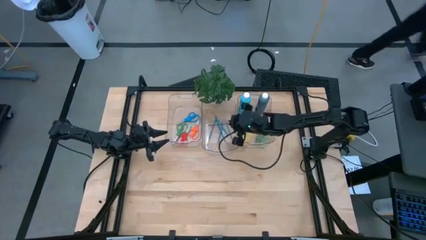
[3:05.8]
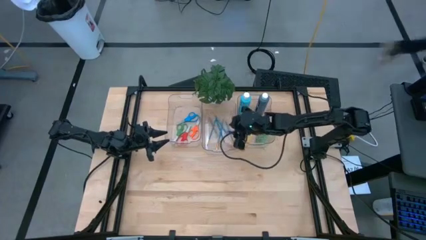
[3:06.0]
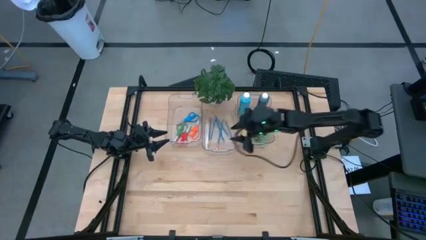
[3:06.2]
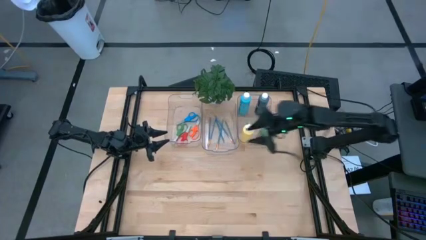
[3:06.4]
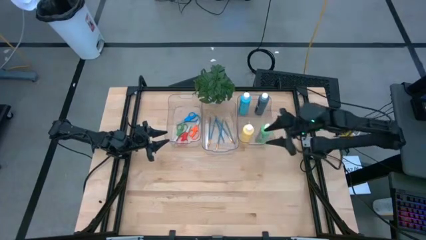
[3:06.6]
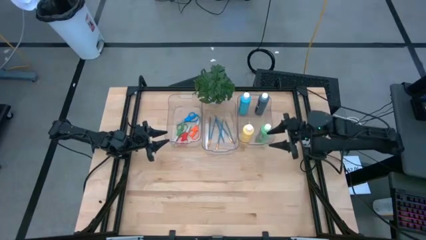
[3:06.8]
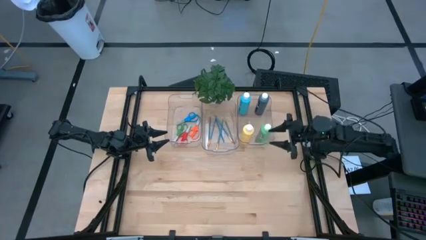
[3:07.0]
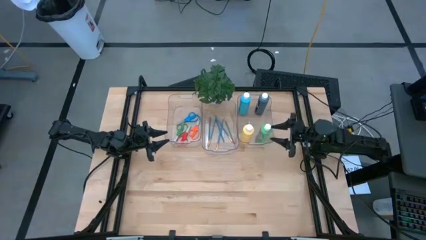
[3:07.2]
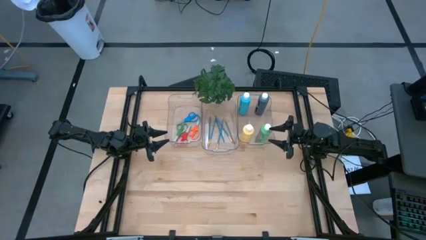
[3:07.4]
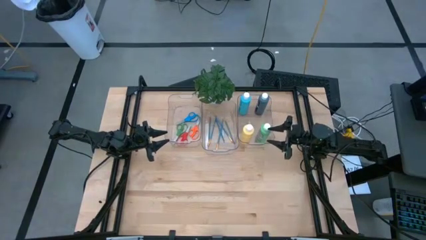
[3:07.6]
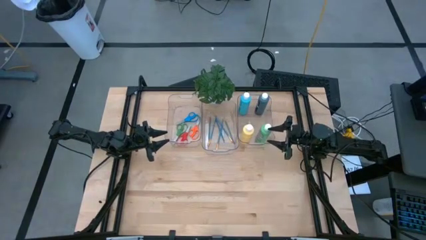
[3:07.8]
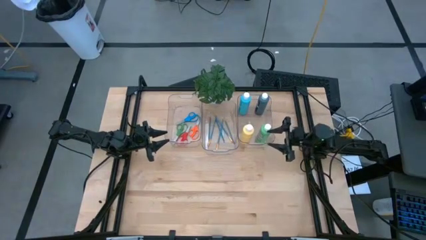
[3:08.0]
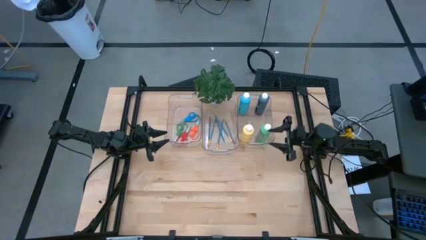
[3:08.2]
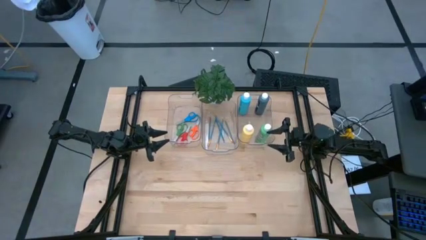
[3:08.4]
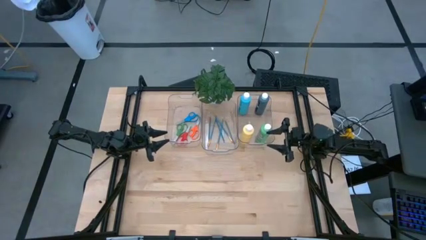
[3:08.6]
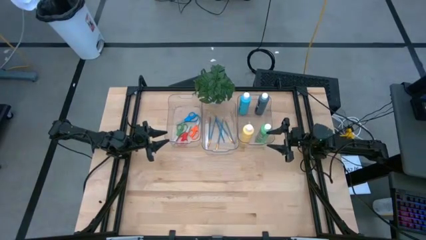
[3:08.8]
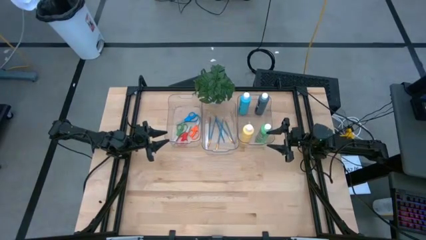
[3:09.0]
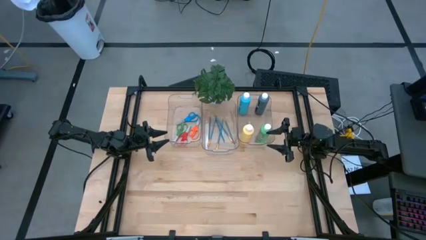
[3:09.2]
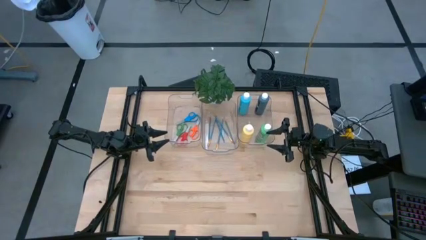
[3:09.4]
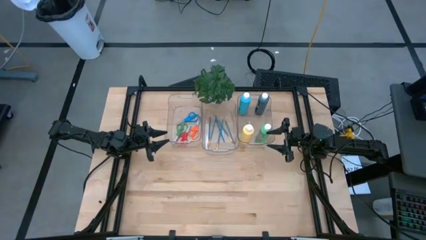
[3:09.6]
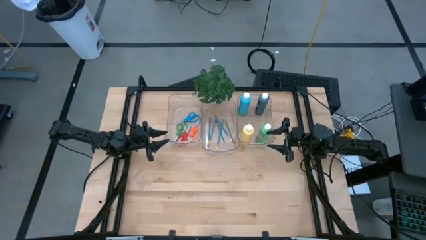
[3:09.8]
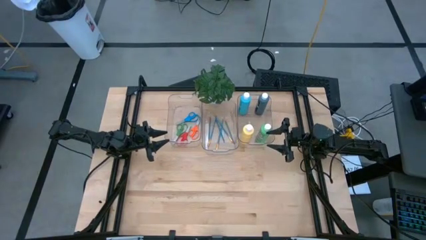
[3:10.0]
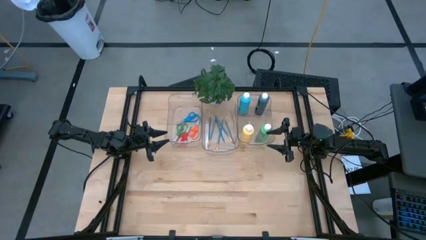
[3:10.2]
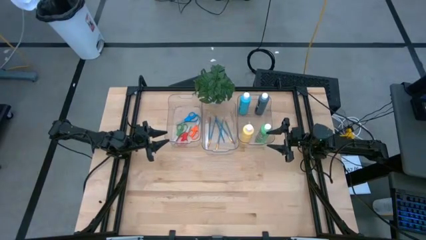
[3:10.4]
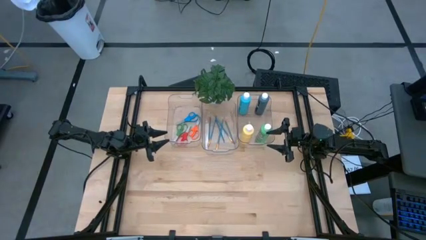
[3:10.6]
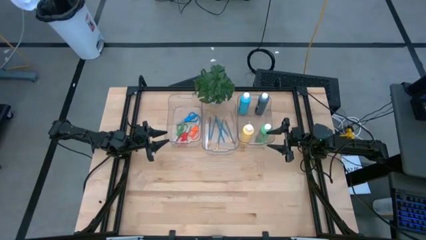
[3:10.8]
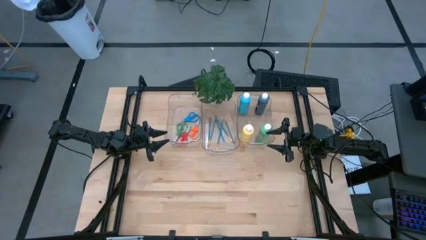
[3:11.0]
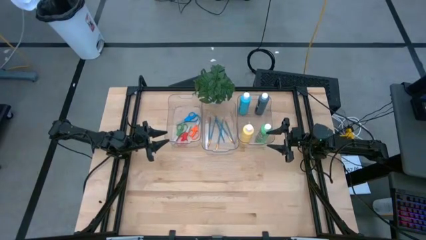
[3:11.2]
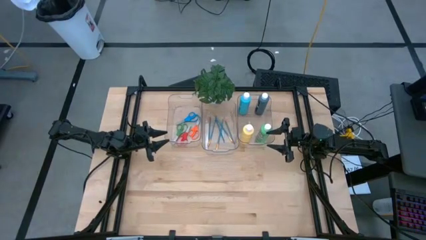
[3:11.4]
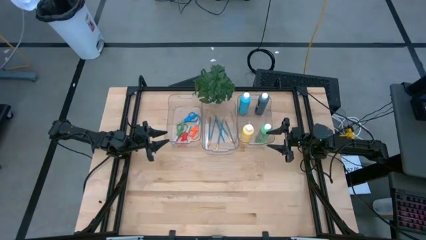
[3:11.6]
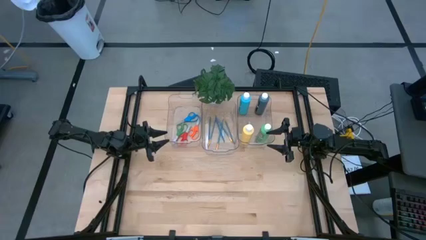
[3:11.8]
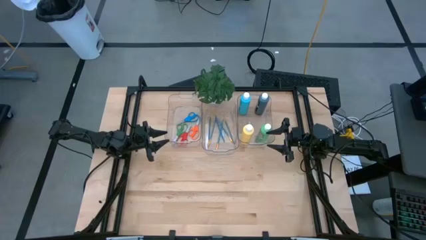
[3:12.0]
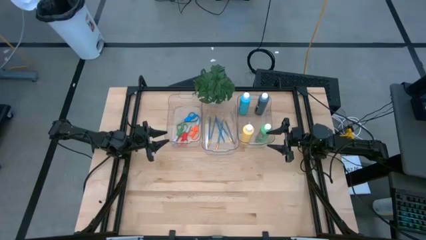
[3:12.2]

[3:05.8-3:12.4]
Task: Pick & Place Paint Supplies
Return to Home Position

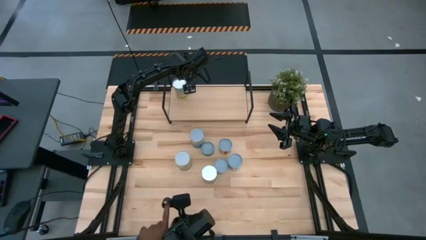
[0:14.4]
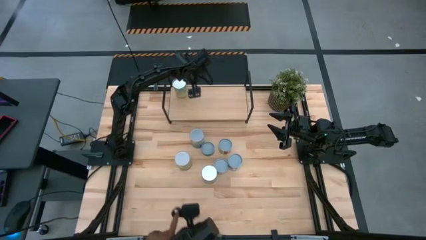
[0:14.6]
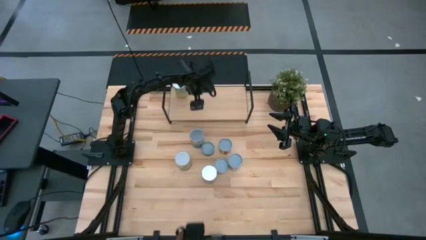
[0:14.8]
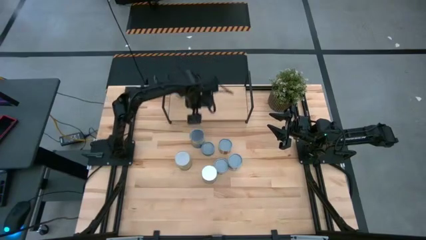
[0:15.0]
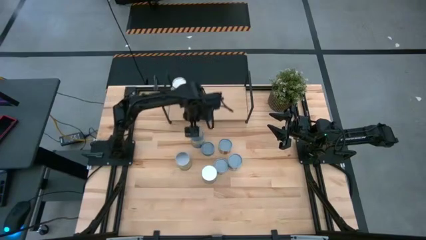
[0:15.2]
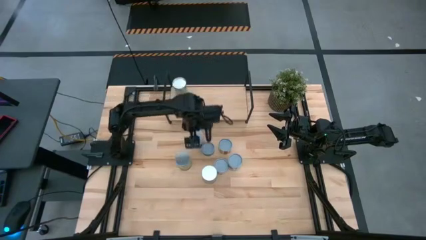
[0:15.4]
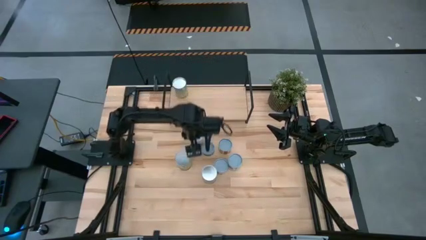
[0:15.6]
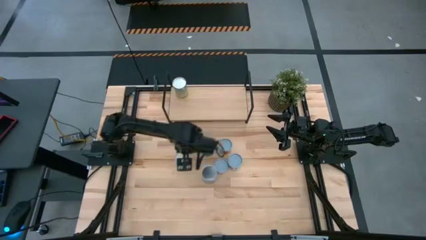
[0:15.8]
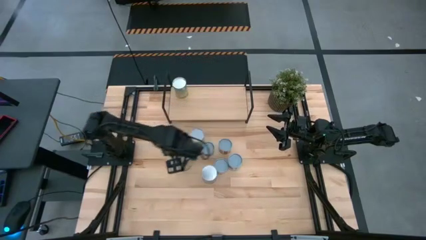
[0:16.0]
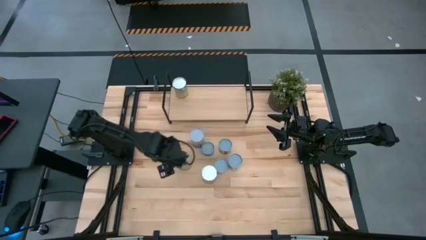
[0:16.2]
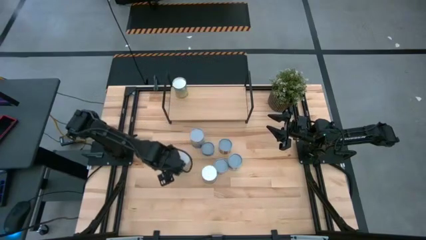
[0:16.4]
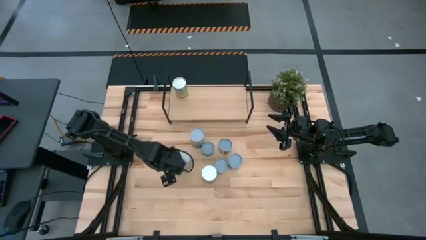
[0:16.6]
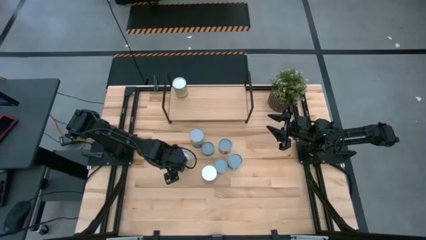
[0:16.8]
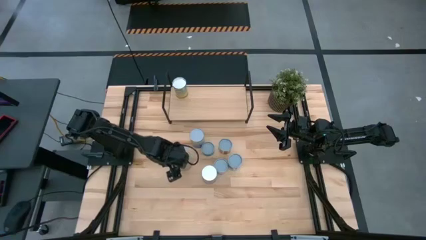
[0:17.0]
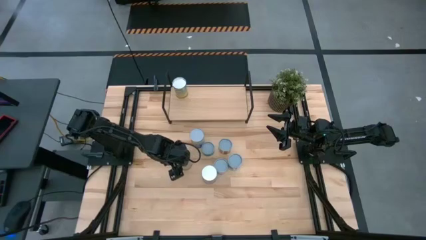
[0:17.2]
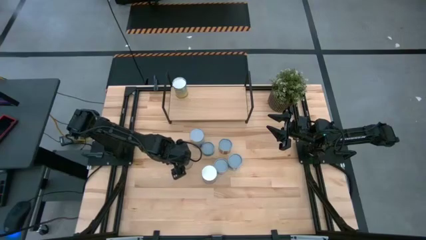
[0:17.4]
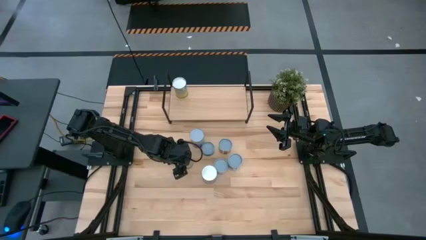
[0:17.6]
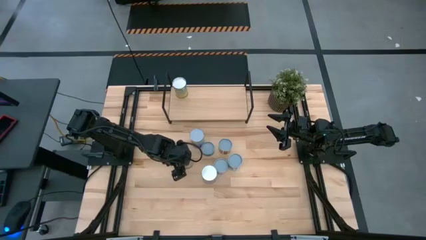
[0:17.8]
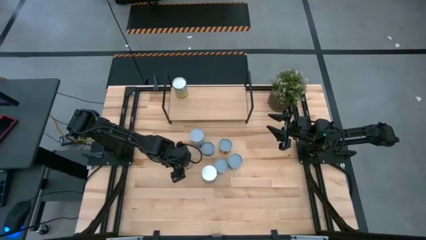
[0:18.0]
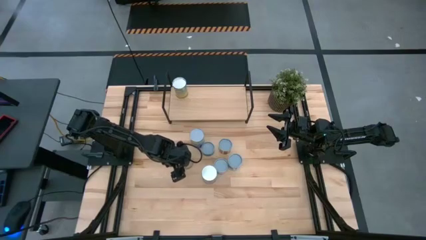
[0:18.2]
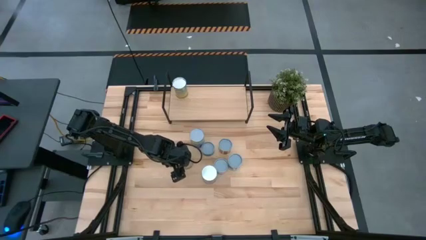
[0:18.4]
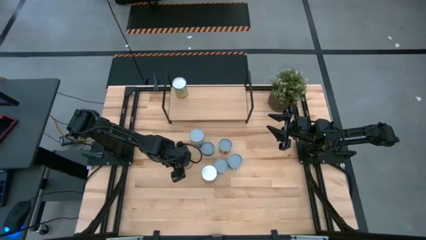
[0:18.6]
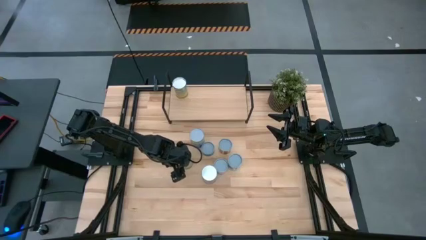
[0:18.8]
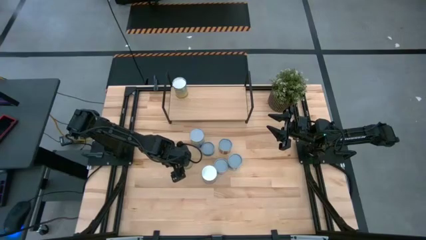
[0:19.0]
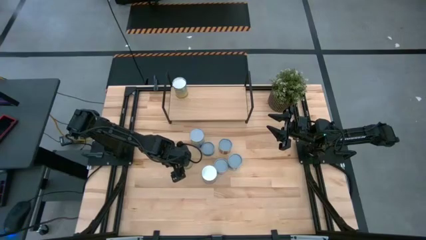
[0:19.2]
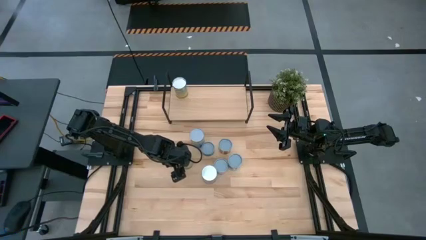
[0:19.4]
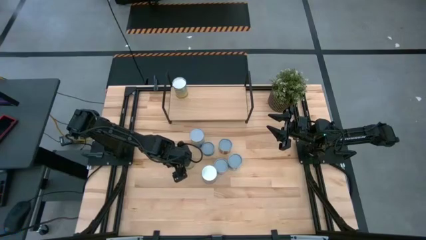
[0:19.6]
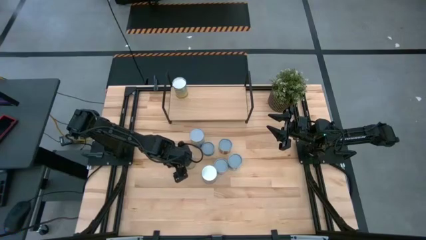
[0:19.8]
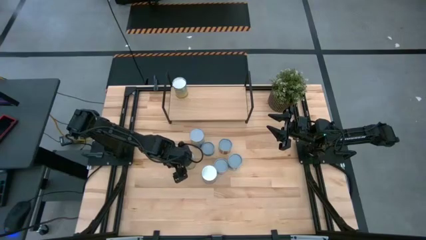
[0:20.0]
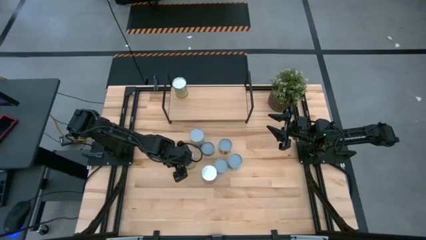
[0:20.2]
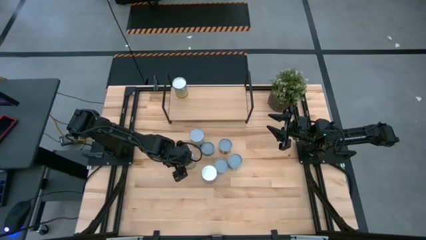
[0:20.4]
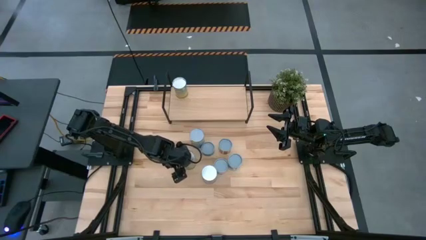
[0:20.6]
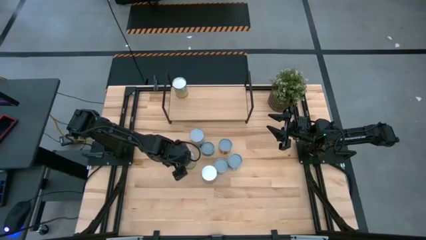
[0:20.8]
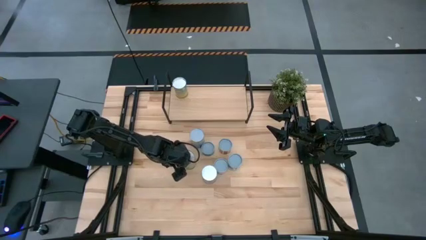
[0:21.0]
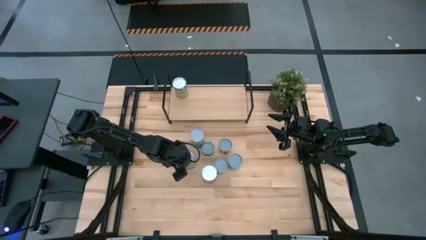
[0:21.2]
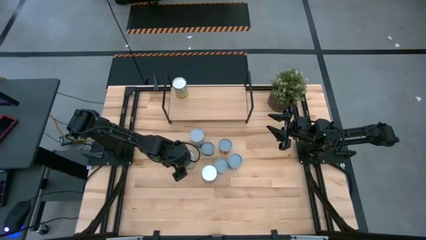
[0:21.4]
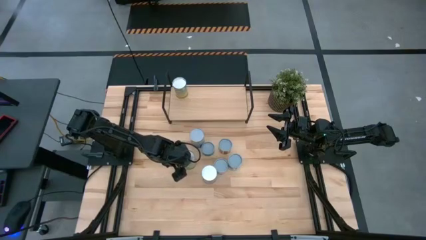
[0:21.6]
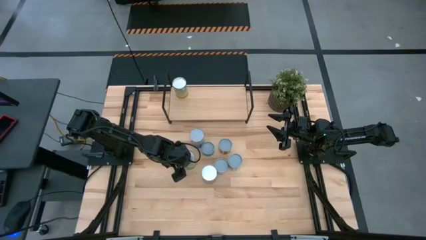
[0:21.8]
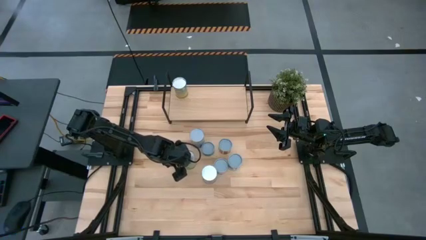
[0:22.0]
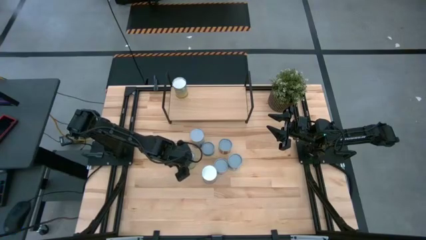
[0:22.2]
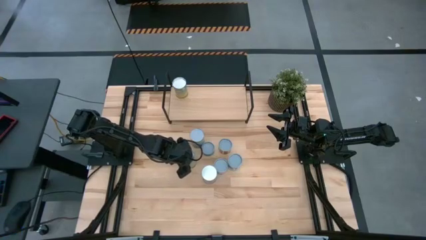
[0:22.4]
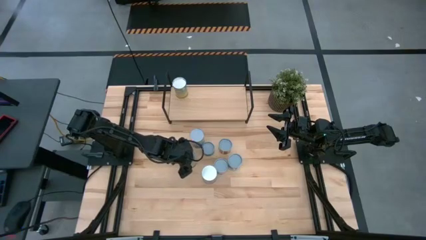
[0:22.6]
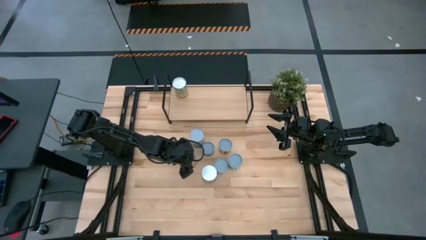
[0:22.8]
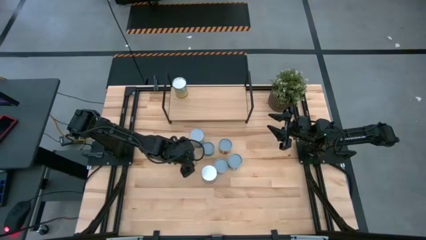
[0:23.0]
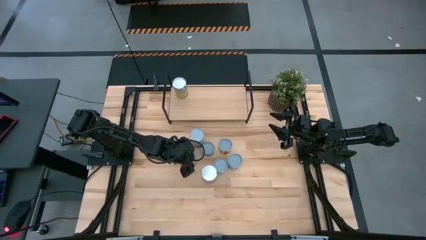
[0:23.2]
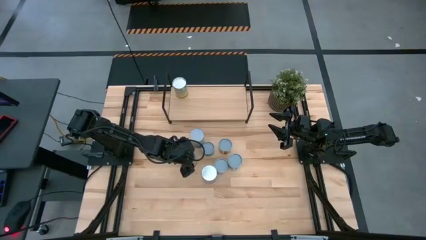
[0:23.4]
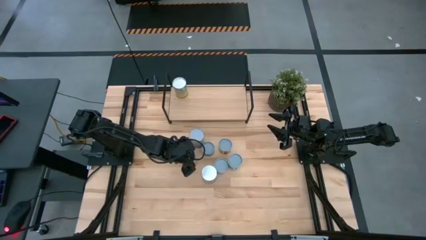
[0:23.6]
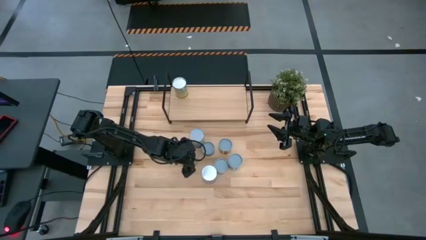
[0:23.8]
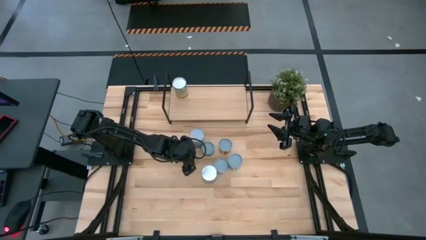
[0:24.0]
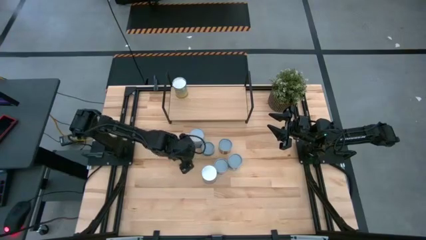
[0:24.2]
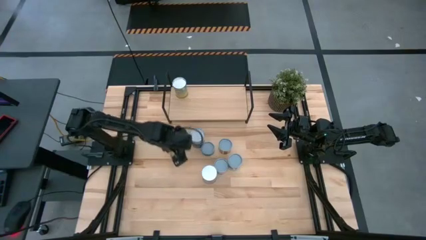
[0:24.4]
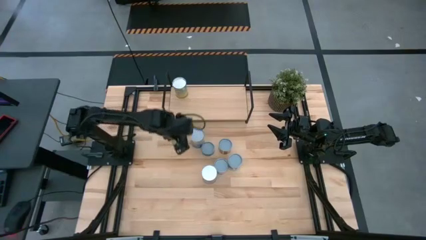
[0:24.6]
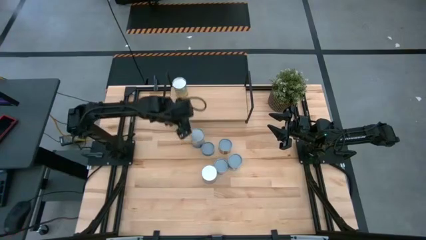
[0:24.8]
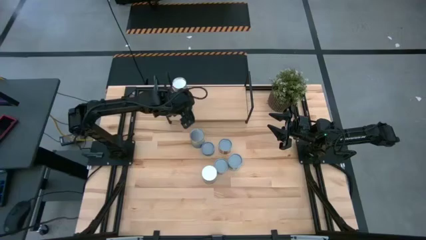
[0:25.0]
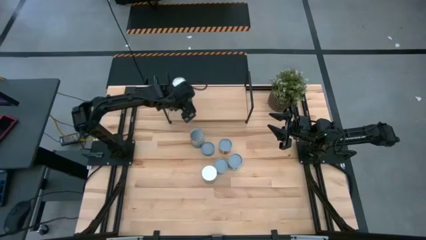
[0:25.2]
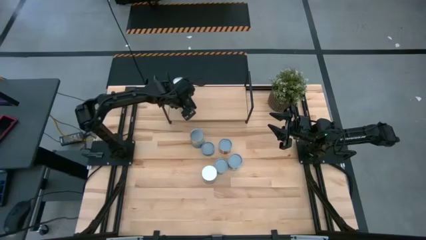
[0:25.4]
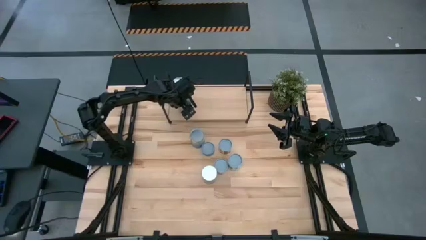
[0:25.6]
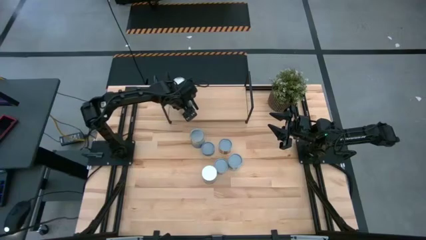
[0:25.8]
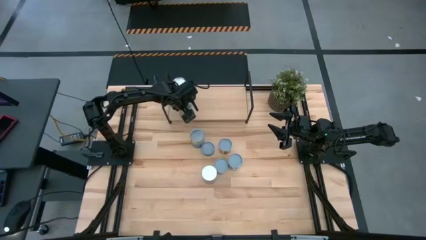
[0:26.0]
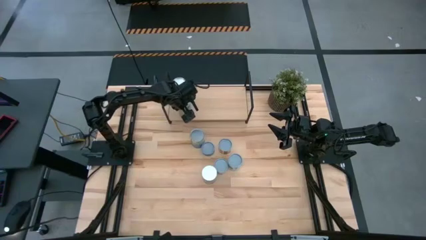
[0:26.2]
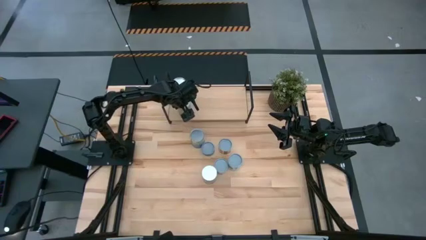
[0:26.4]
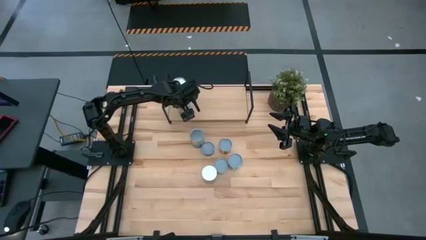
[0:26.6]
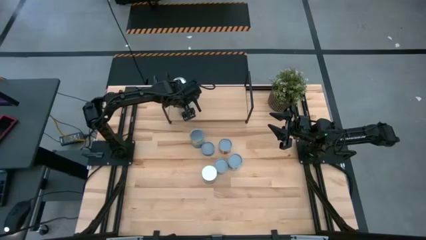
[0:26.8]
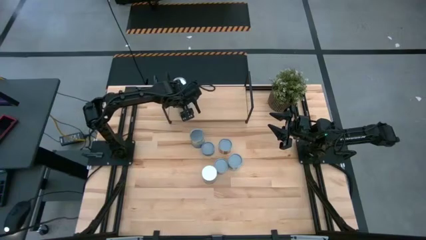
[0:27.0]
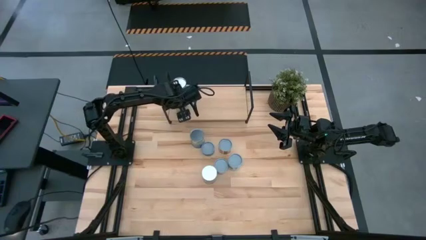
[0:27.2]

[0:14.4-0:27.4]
Task: Pick and place cans onto a shelf
Put the canned oranges on the shelf
